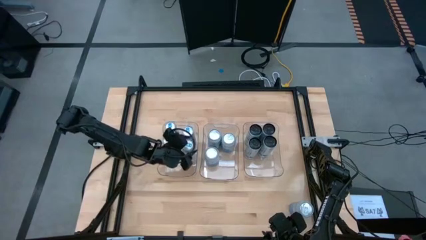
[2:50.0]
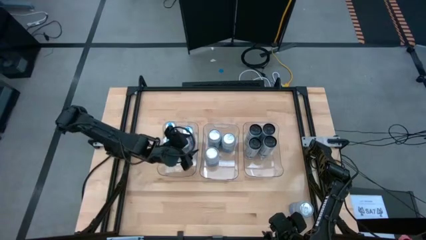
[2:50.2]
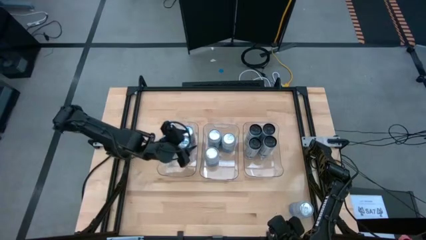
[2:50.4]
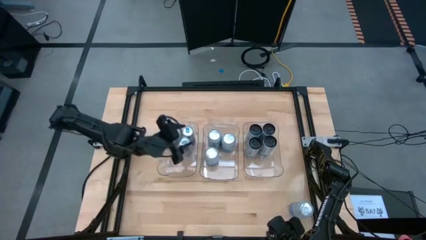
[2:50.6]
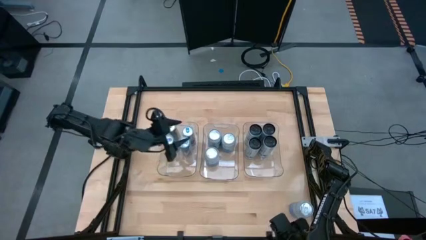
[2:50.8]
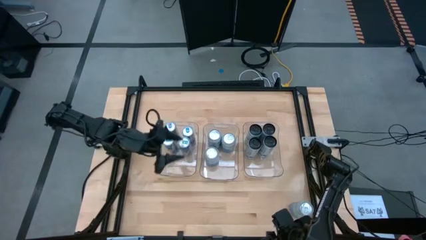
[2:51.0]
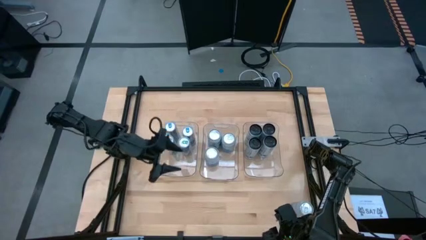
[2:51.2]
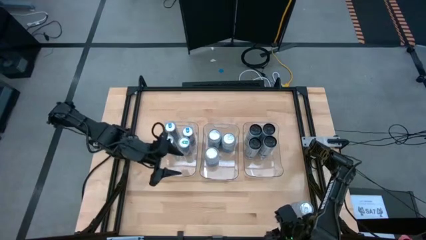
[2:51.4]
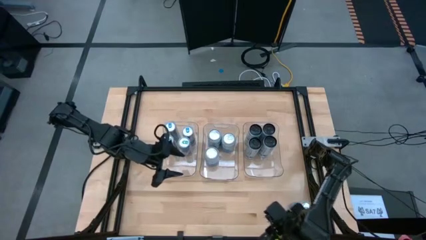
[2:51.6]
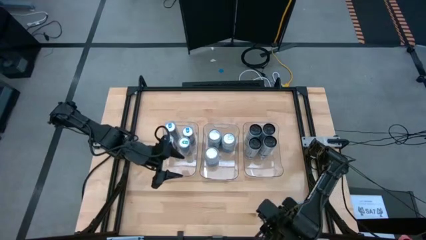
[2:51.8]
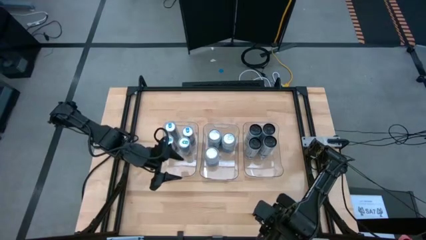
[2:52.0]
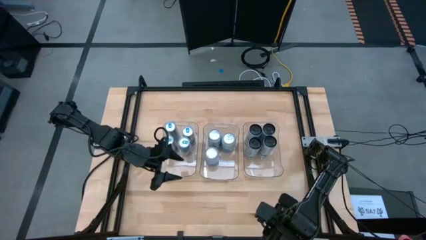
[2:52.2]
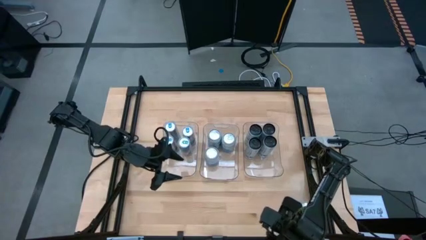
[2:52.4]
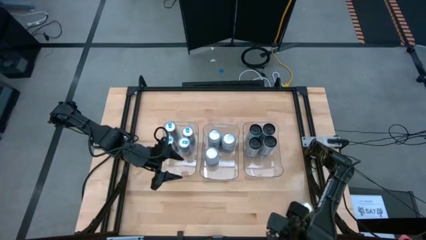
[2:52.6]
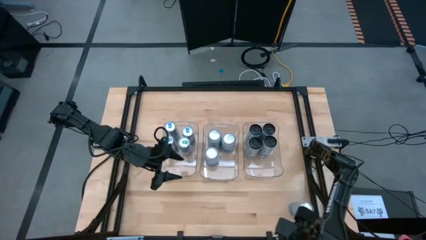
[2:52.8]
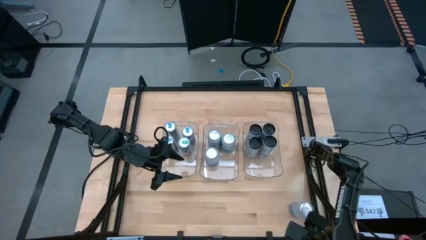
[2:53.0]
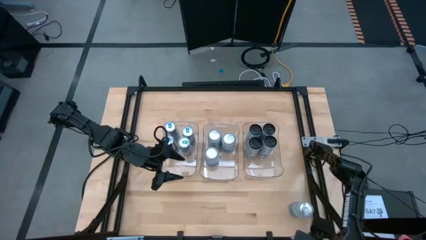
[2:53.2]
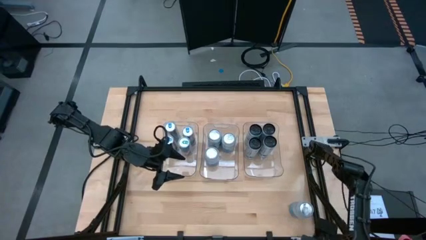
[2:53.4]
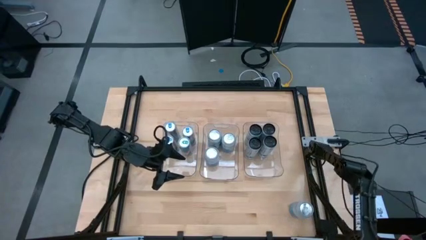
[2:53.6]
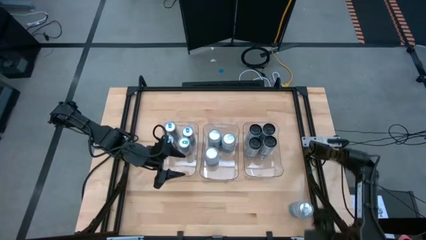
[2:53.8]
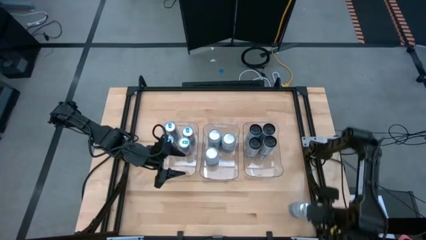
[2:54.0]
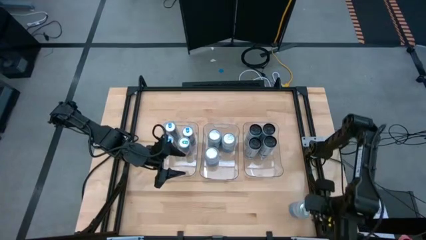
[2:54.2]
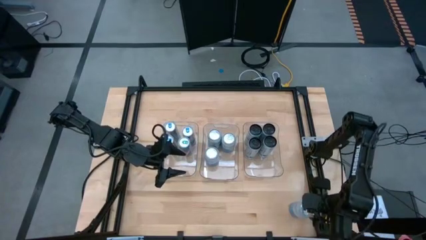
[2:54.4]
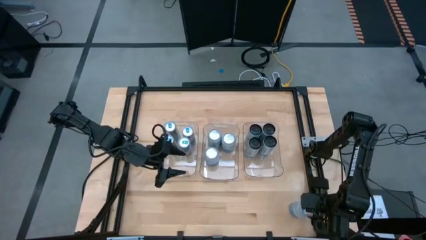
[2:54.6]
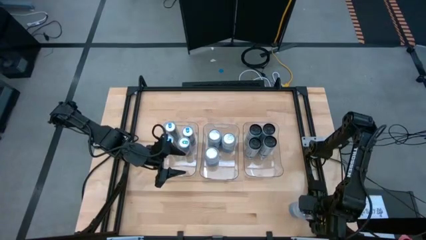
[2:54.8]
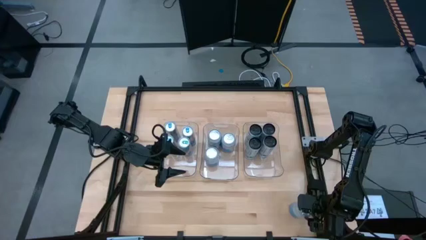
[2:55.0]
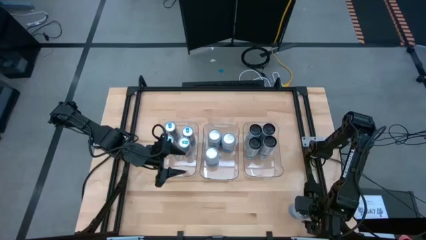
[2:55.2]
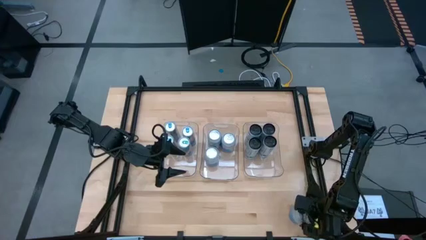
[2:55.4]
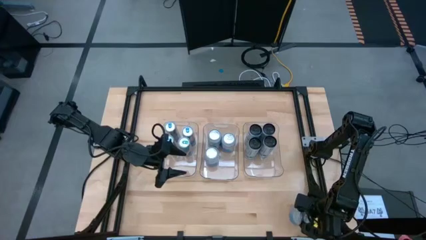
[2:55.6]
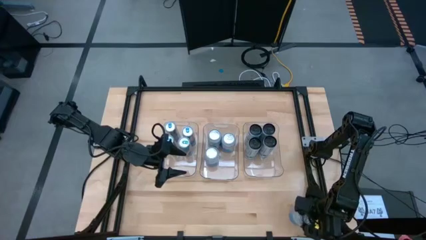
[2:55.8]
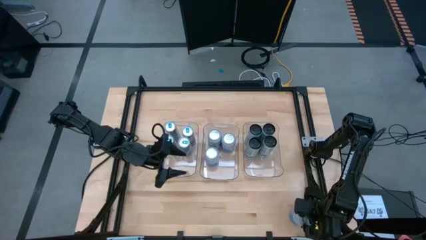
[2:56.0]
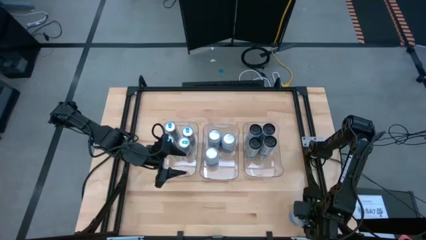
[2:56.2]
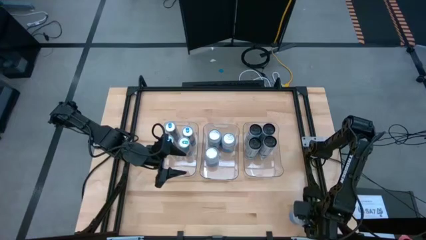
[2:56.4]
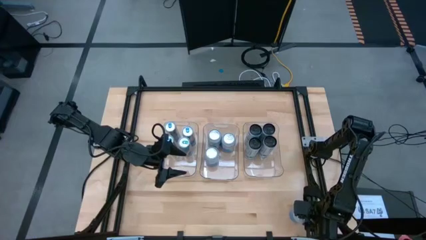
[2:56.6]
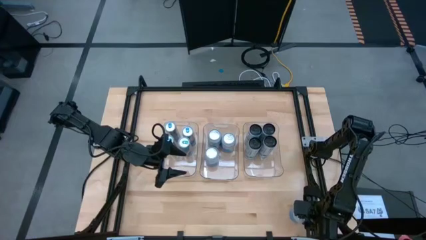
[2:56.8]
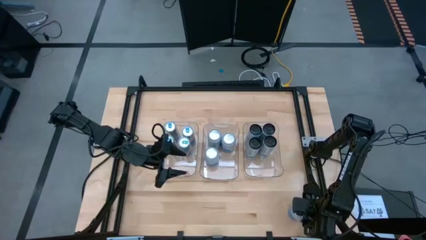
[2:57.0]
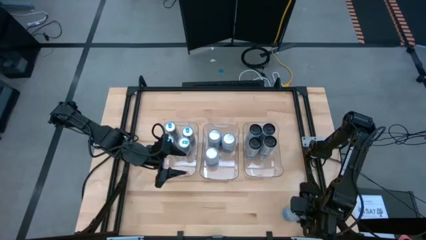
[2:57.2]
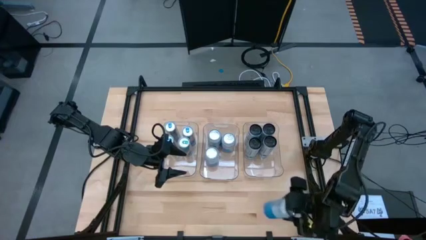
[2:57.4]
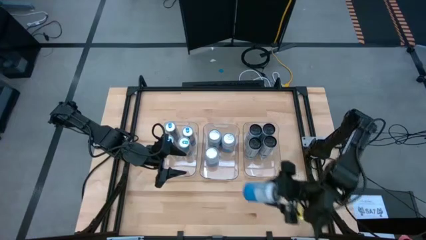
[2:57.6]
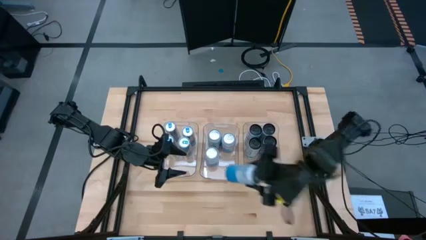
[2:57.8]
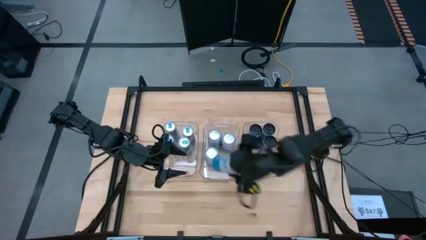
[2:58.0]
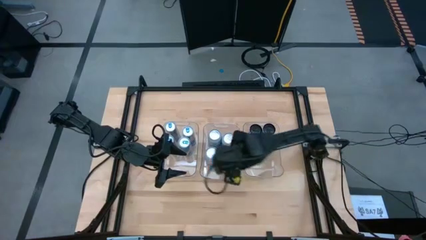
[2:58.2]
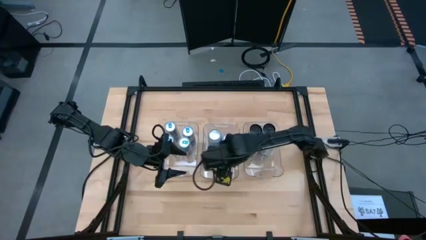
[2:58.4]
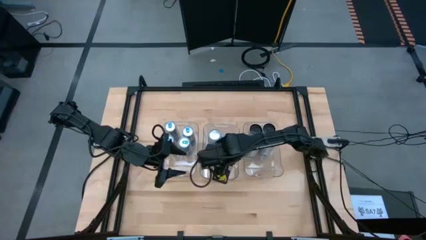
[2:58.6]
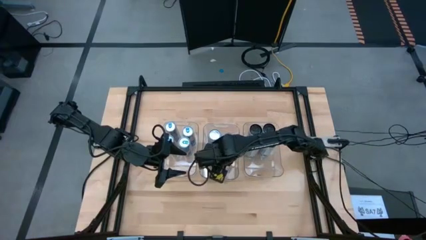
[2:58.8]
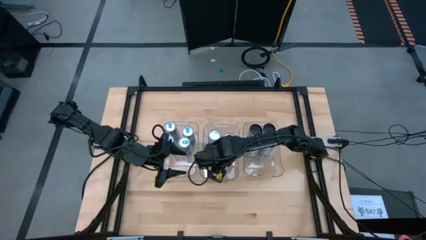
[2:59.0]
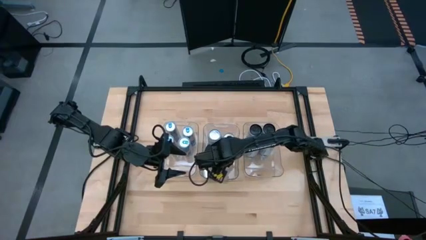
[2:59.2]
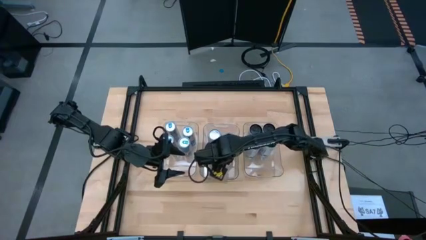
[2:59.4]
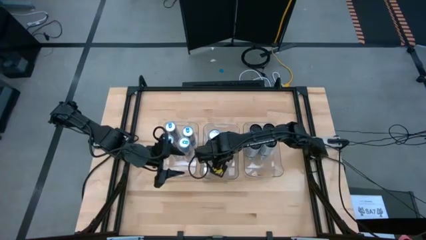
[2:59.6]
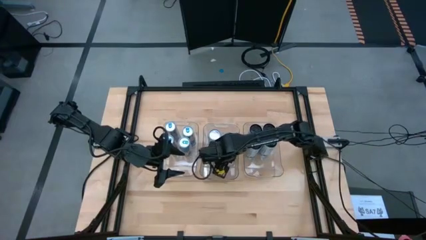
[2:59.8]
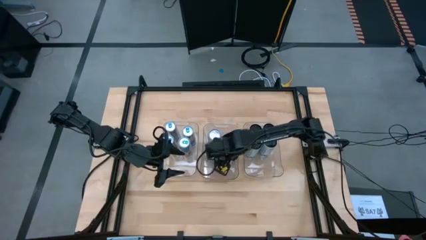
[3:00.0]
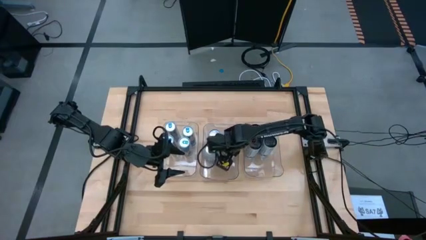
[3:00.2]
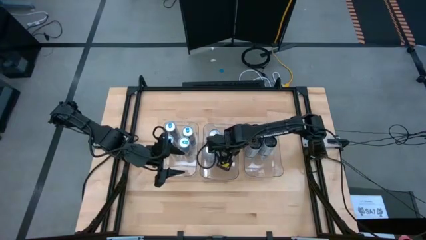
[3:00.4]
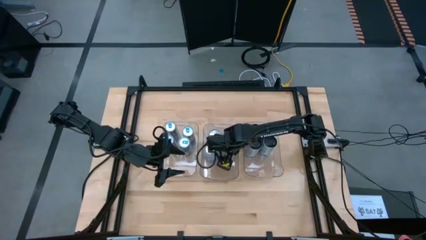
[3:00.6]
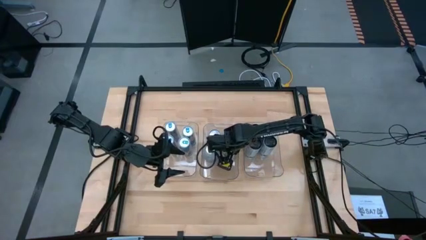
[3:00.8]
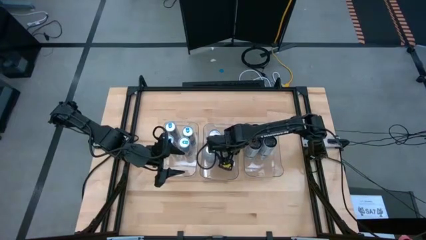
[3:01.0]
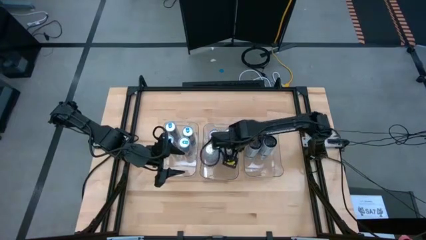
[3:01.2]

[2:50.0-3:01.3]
Task: Sort soda cans
Put the blue-white soda can into the middle transparent bin

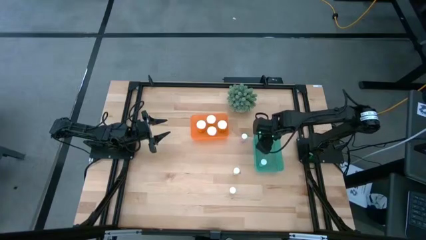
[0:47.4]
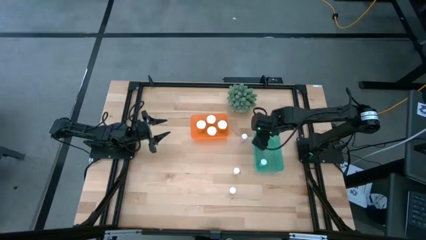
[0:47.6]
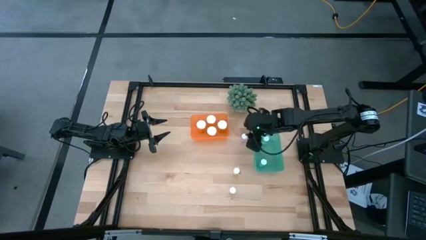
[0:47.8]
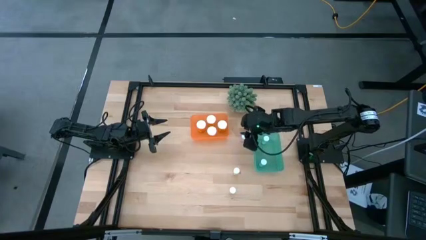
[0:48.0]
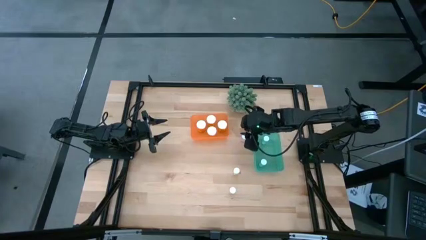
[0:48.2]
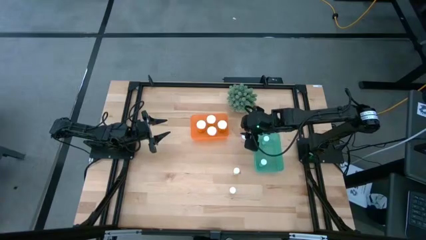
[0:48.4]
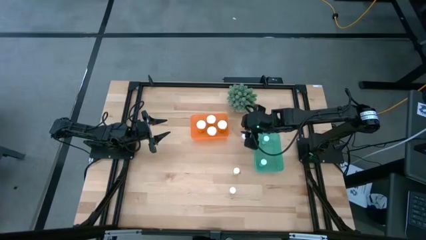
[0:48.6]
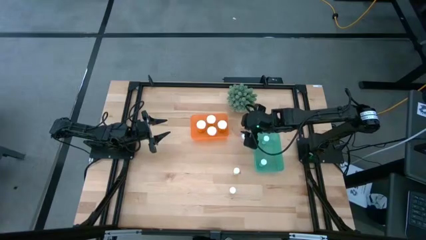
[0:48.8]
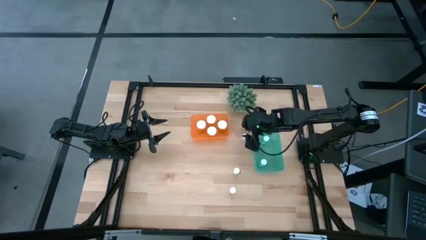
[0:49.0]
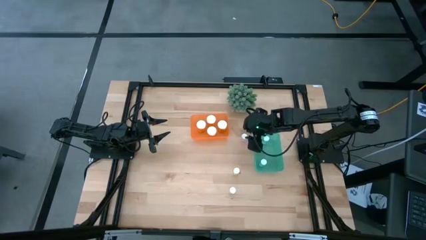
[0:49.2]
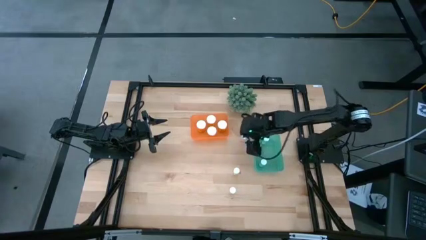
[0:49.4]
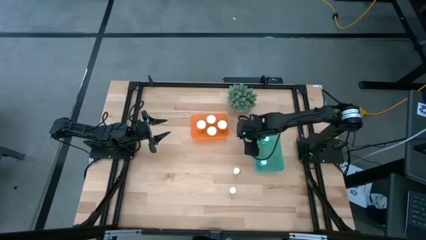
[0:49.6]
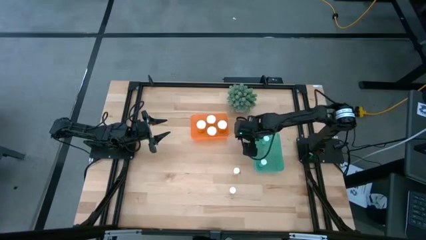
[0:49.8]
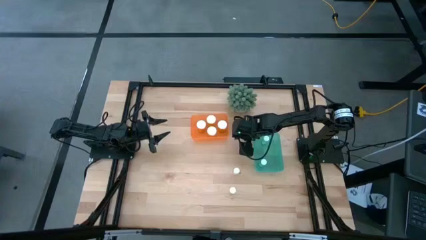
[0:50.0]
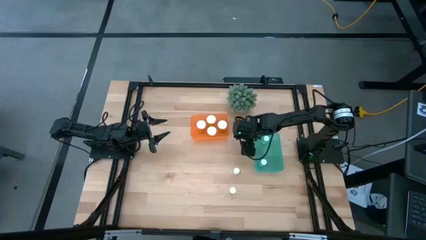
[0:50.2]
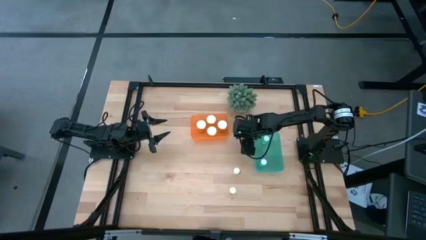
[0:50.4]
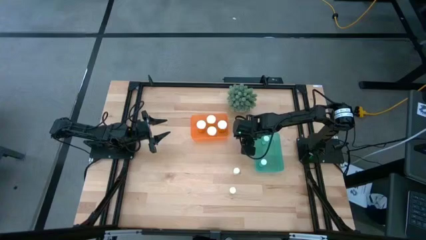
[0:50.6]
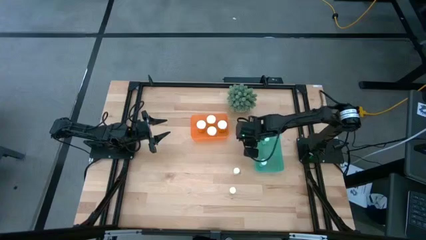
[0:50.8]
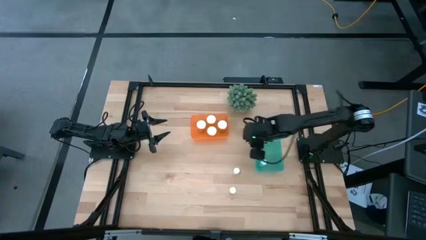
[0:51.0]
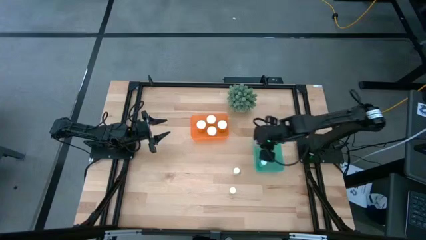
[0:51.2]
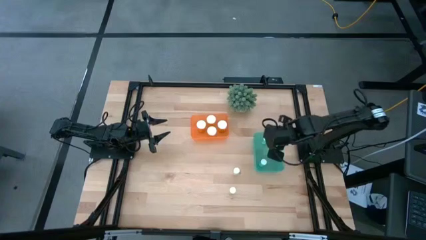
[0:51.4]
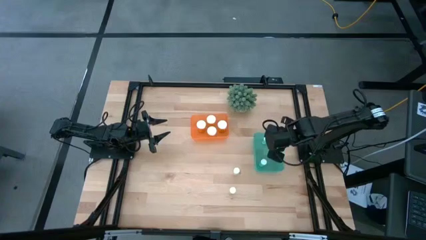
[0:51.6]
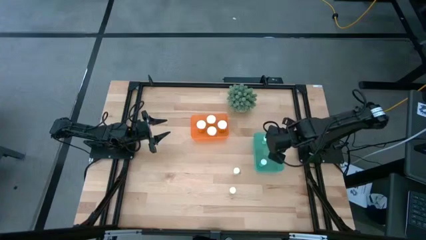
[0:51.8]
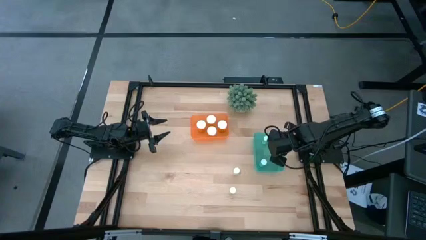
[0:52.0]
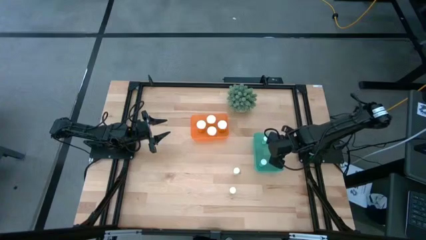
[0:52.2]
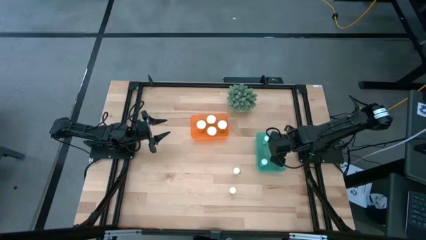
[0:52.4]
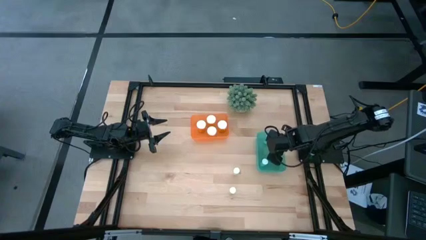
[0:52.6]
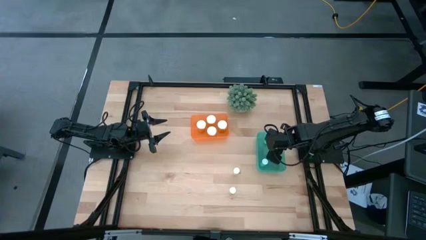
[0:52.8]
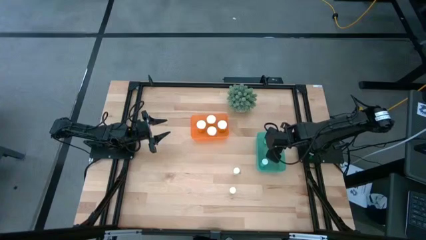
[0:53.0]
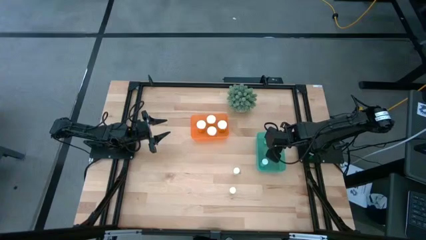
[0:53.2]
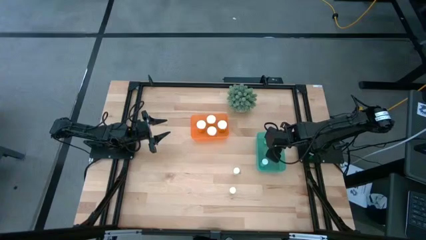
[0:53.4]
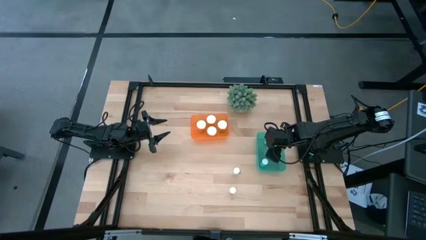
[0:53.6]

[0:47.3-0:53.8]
Task: Pick and place medicine bottles into bin by pill shape (circle, oval)
Put the pink pill bottle into the blue bin
